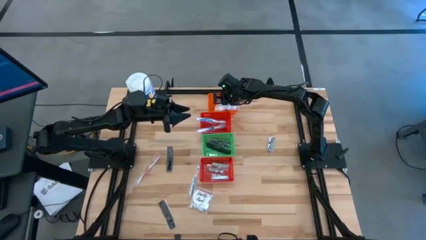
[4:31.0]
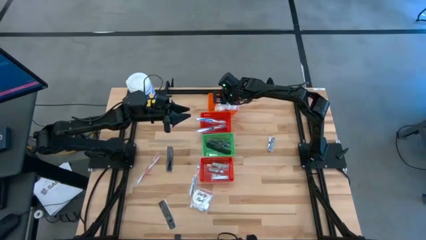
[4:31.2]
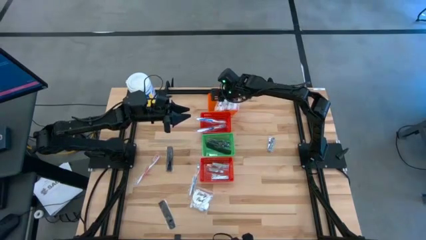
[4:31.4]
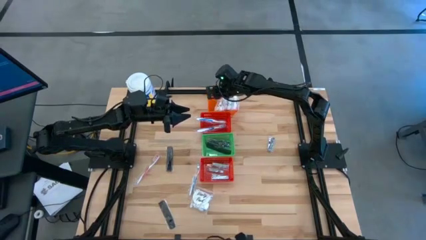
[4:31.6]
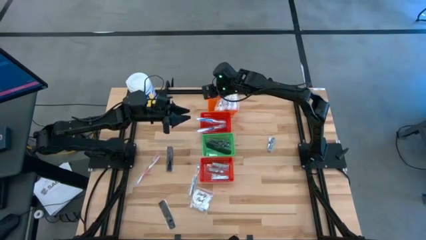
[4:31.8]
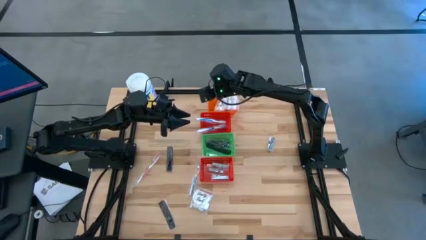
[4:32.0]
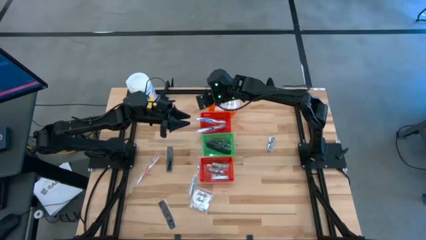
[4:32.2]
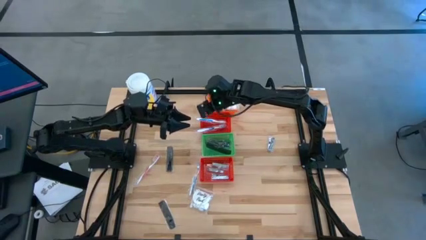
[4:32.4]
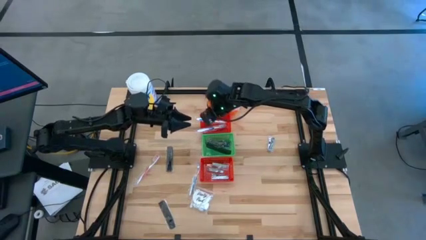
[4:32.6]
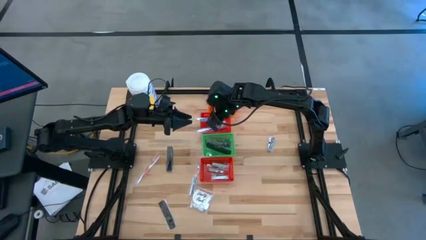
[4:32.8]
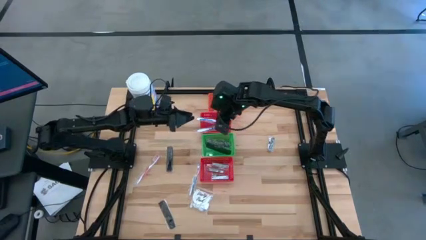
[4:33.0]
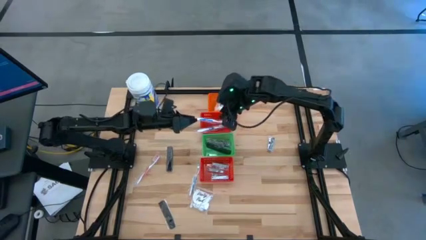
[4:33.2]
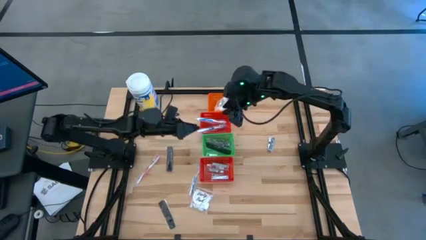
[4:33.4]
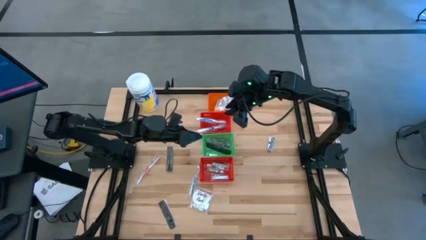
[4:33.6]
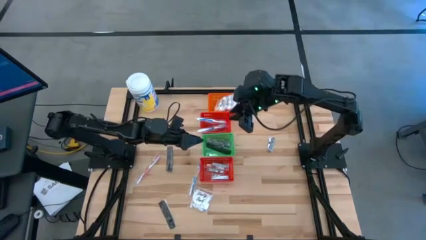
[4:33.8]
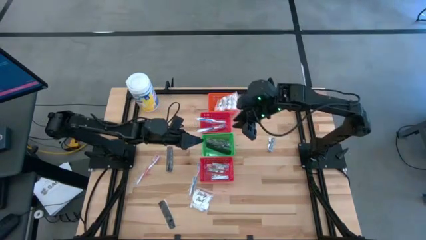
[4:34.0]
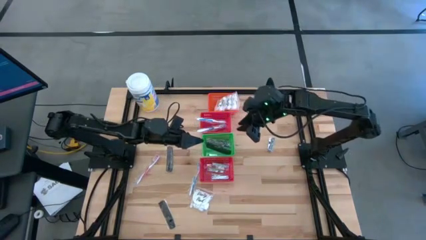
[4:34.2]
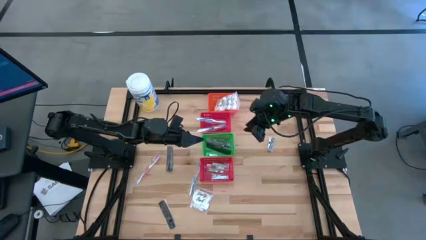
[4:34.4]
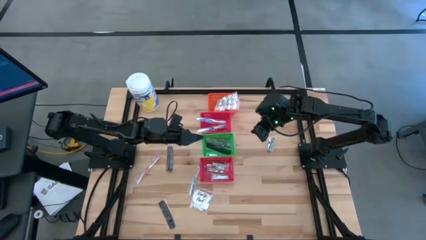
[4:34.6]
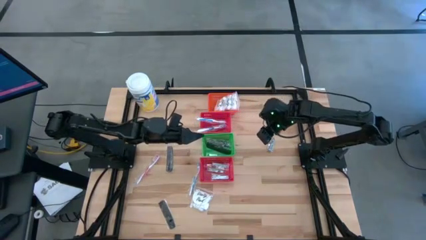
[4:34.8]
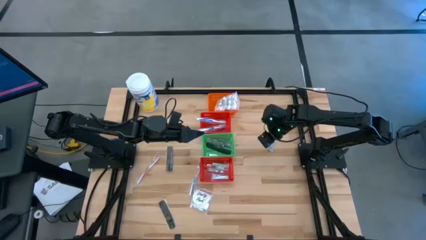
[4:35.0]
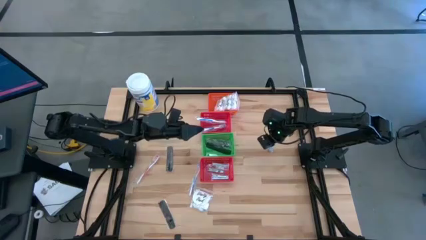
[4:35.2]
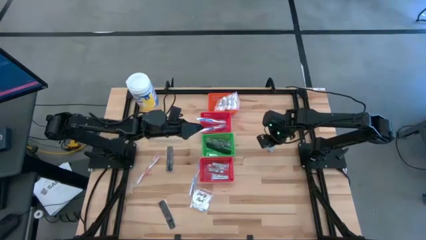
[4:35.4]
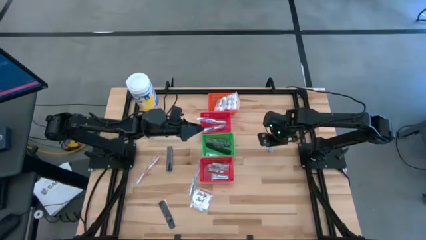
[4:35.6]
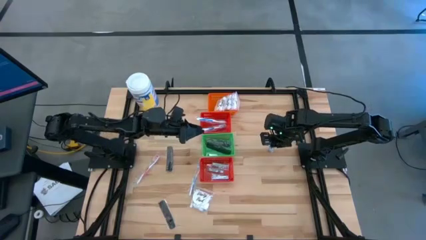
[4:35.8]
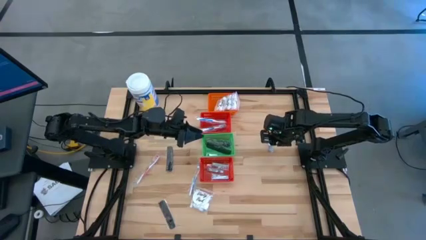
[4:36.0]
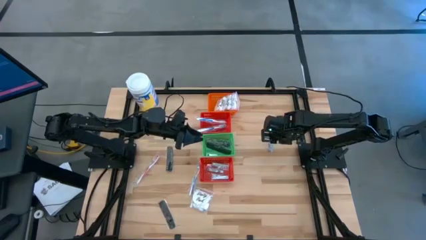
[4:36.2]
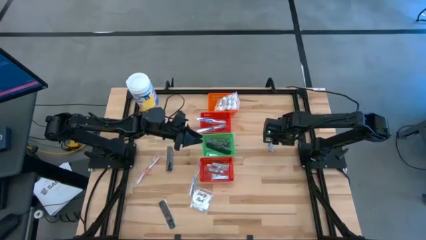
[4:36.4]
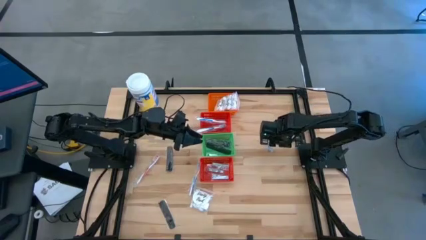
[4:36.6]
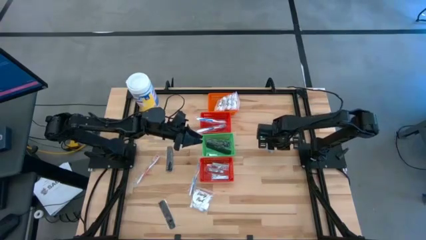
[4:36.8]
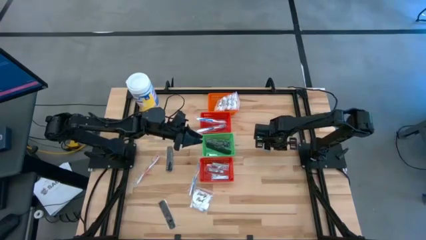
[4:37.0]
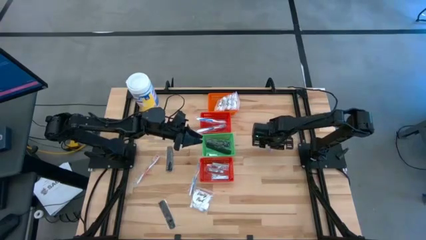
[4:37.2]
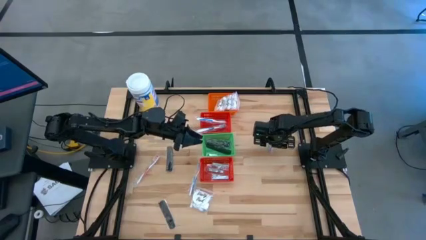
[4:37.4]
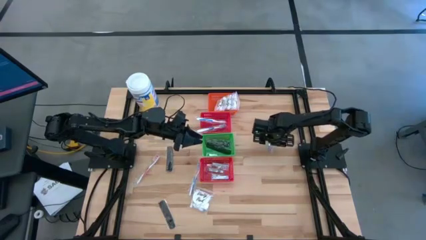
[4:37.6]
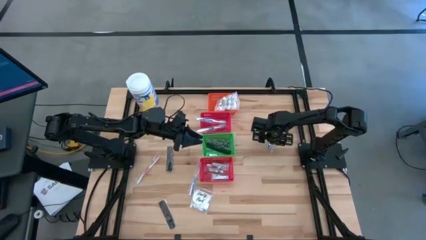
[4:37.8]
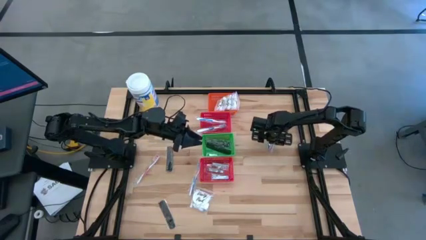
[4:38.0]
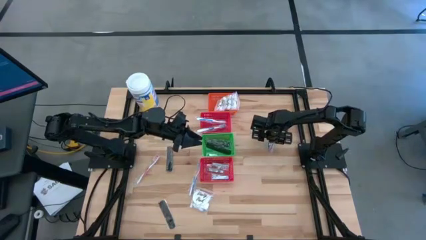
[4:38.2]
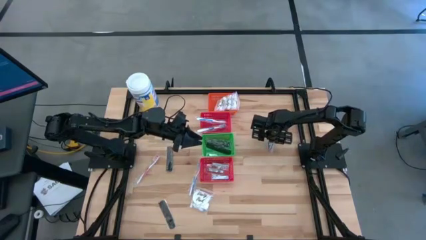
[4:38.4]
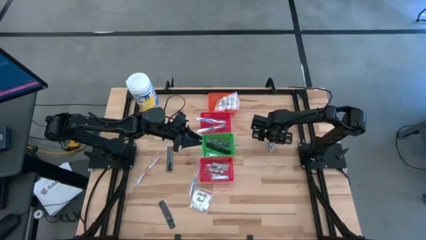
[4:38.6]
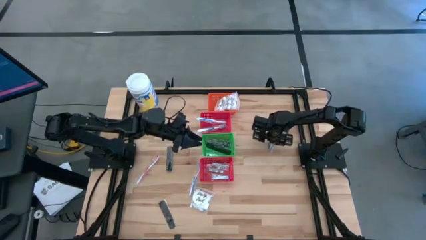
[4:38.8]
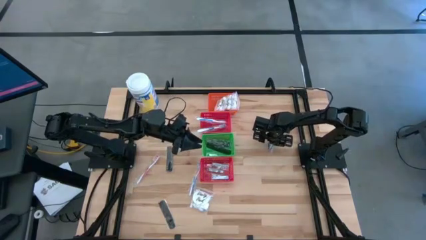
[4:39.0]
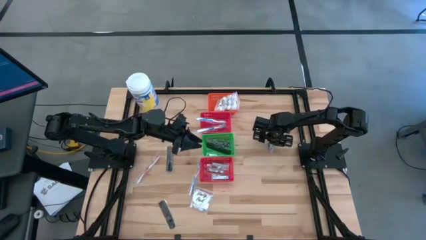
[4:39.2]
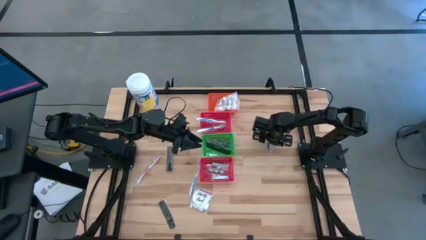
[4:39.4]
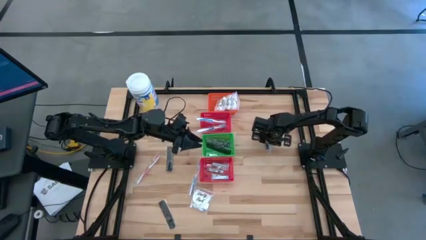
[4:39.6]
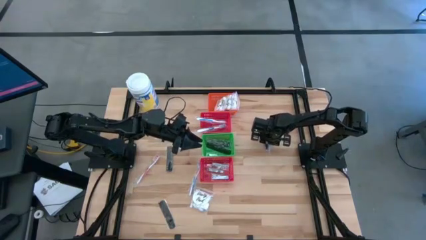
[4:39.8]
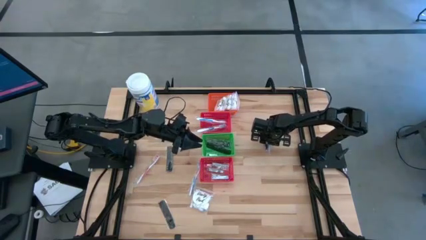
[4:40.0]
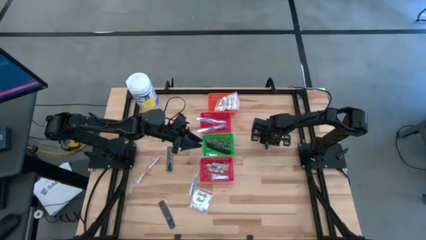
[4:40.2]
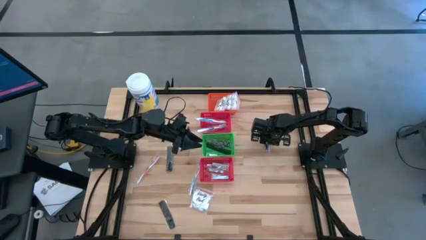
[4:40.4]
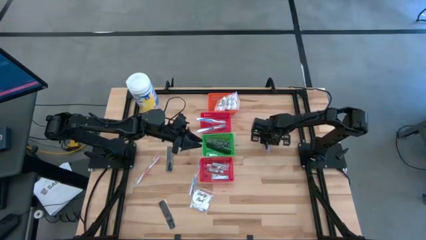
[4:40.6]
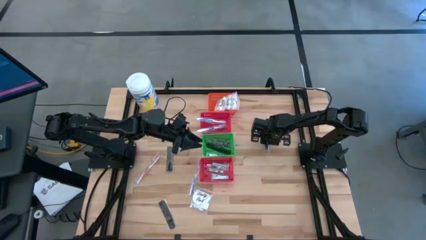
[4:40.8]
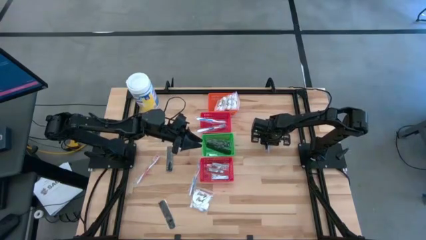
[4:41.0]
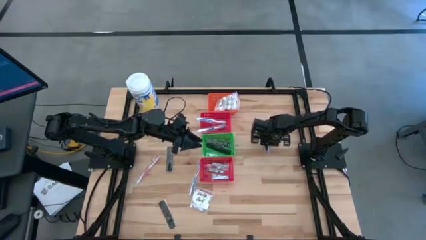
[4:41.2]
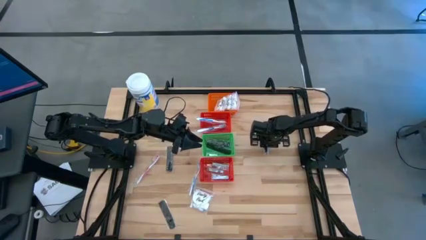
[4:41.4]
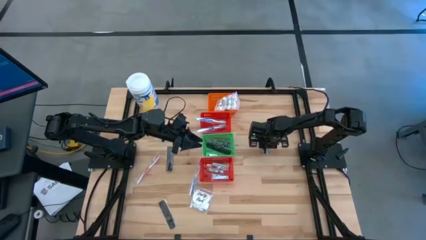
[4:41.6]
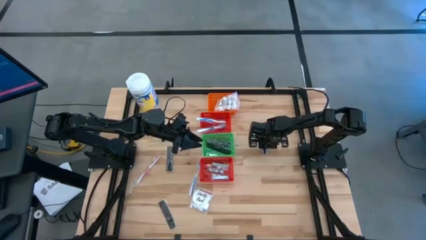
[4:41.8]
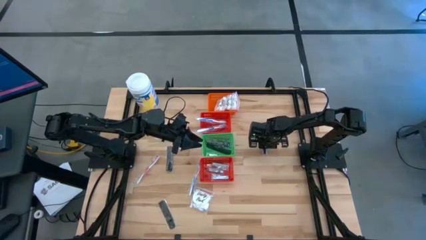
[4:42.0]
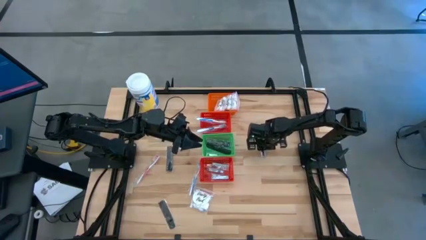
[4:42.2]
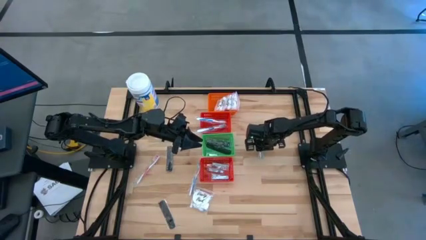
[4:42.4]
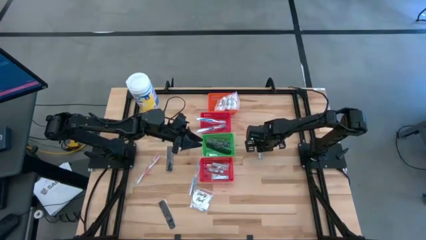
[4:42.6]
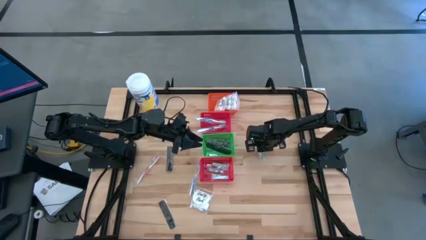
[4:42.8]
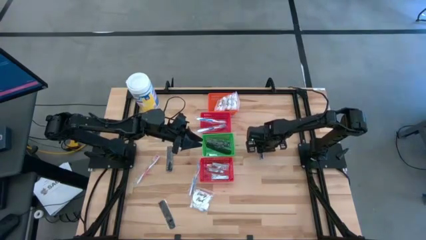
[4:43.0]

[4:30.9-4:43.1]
Task: Pick & Place Travel size toiletries
Put the silver nail clipper into the bottom red basket

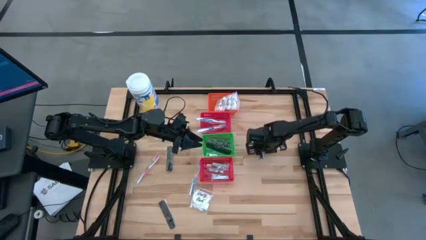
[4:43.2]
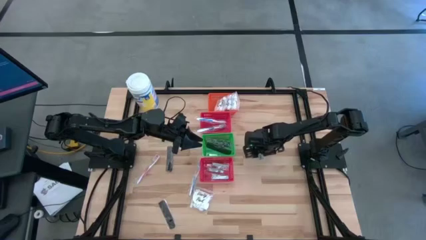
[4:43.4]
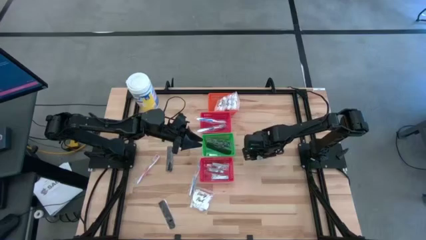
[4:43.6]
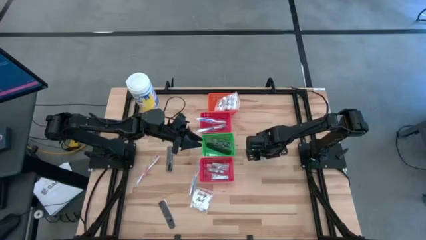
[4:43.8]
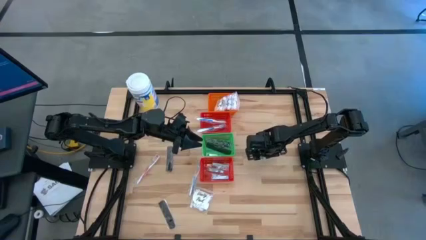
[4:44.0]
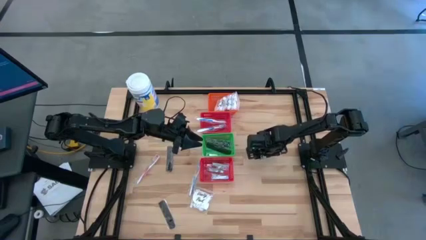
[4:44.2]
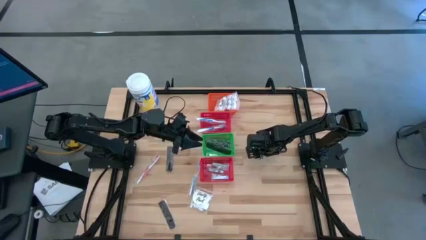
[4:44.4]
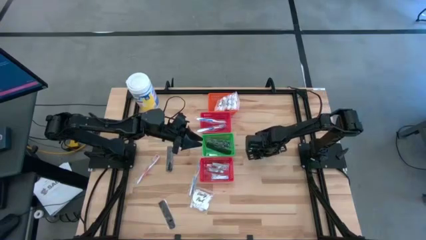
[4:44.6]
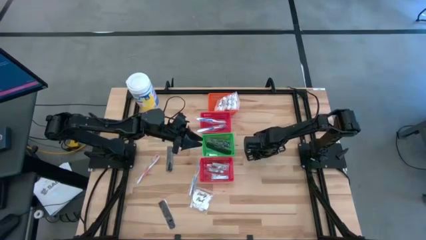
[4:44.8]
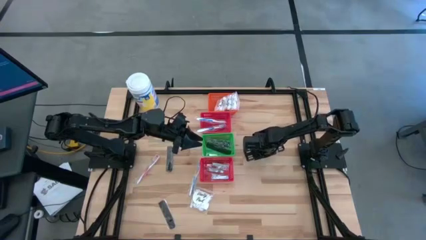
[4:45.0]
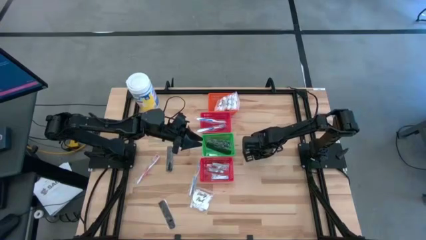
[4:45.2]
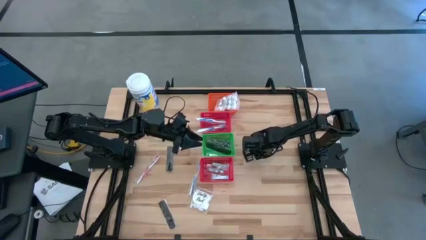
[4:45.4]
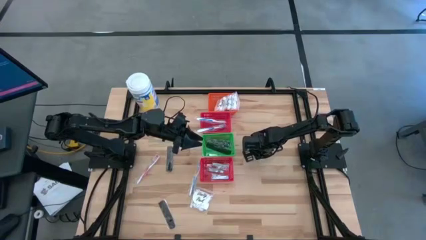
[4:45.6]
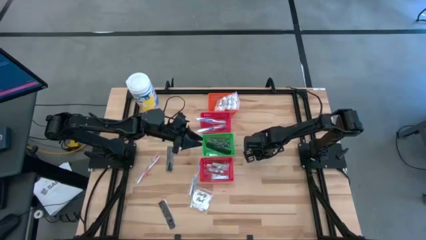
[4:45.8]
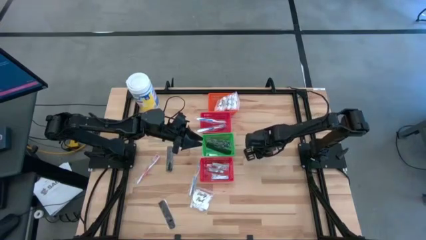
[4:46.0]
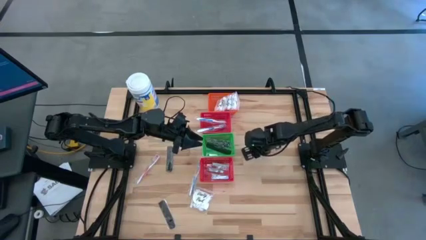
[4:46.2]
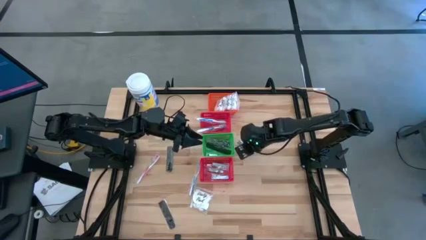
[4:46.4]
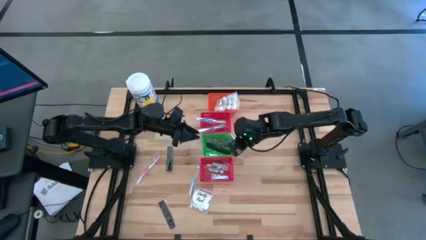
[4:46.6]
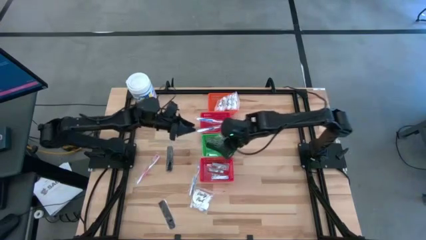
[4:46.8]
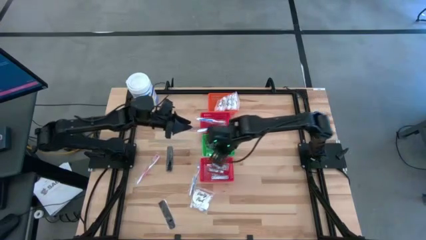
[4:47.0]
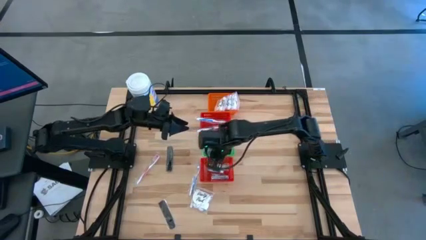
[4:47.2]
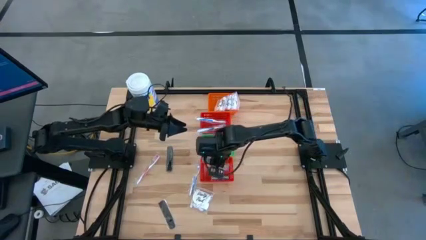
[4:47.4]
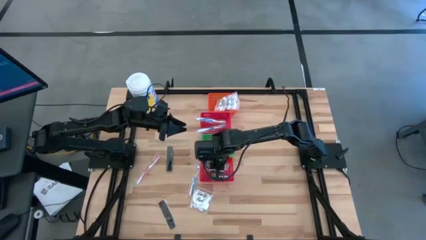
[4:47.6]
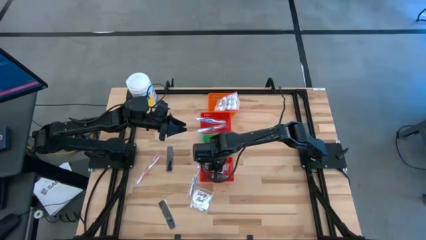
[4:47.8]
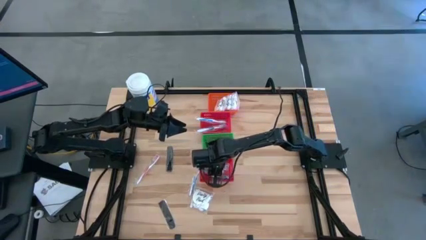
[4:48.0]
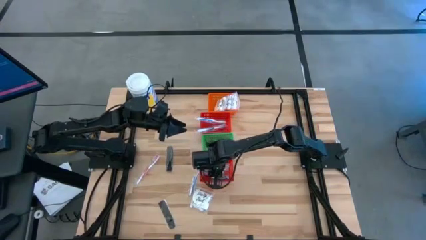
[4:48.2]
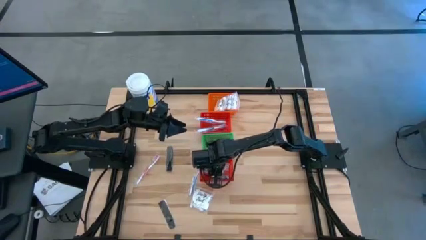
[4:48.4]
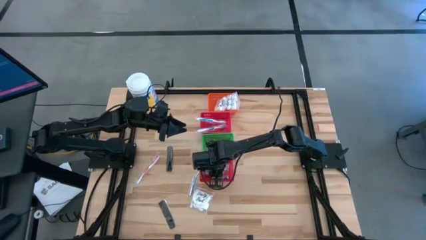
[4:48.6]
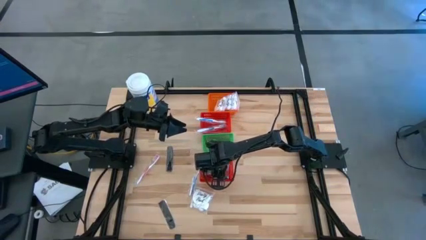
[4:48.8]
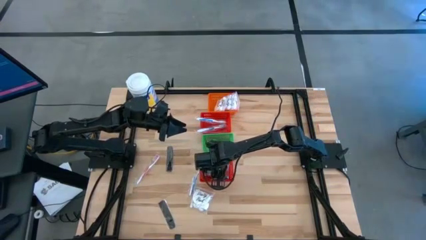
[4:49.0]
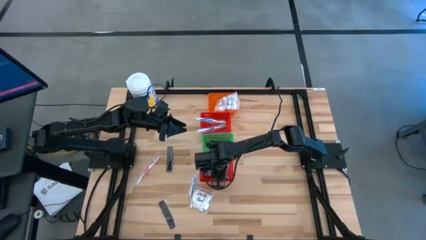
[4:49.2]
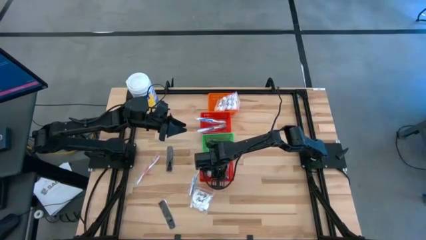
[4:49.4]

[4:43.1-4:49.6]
Put the silver nail clipper into the bottom red basket
